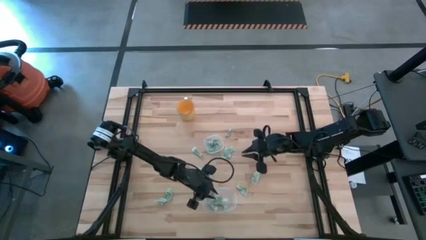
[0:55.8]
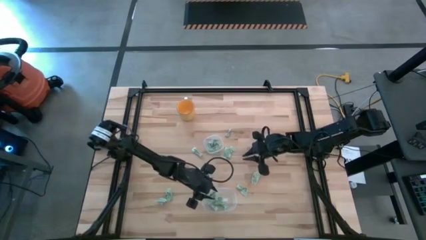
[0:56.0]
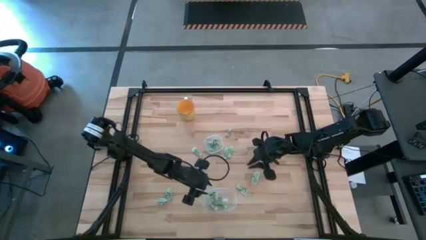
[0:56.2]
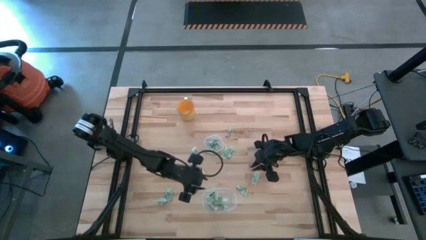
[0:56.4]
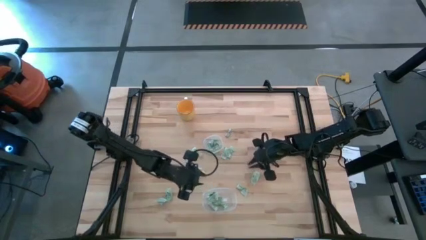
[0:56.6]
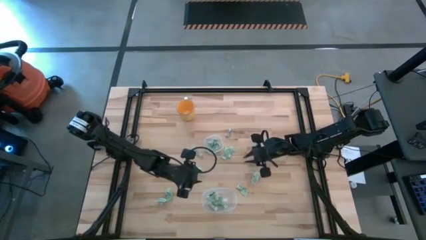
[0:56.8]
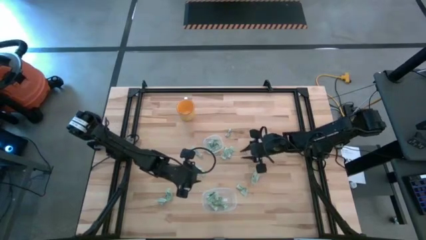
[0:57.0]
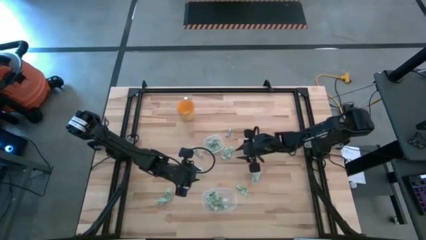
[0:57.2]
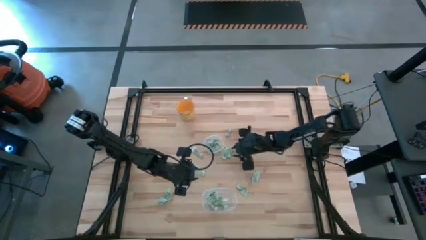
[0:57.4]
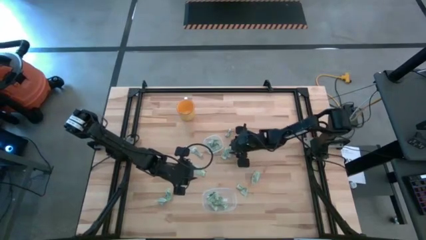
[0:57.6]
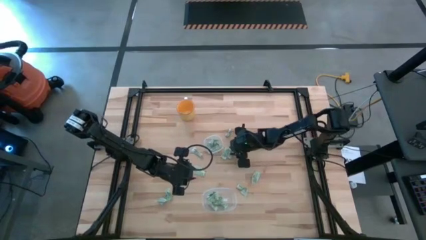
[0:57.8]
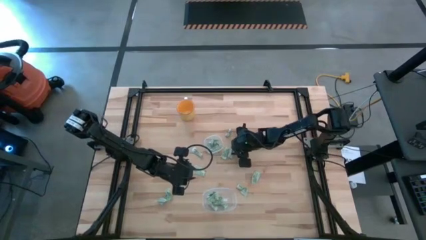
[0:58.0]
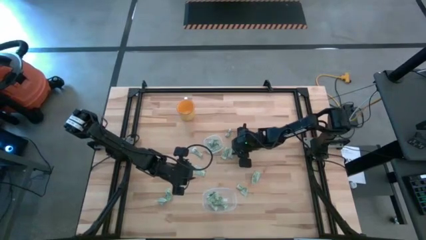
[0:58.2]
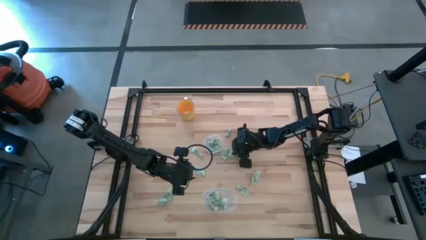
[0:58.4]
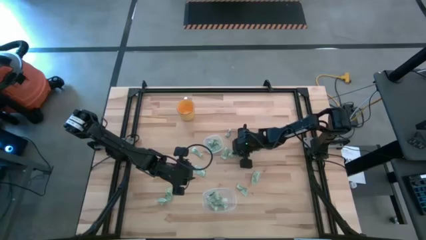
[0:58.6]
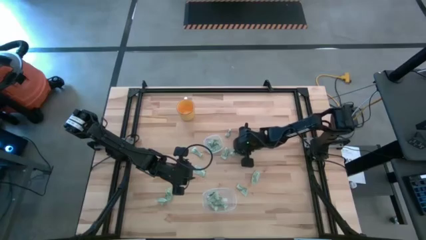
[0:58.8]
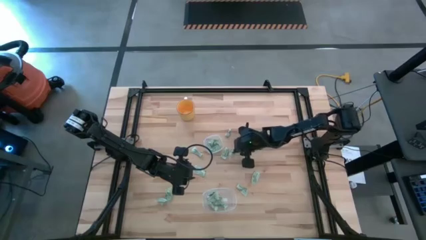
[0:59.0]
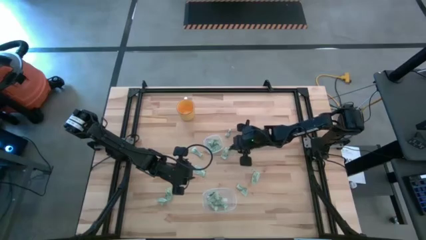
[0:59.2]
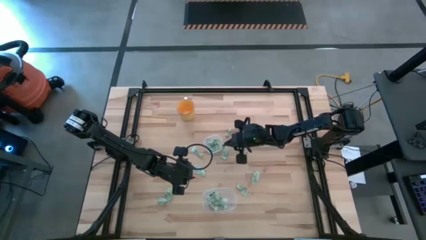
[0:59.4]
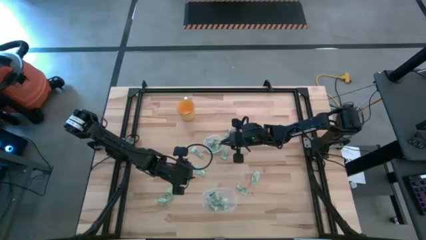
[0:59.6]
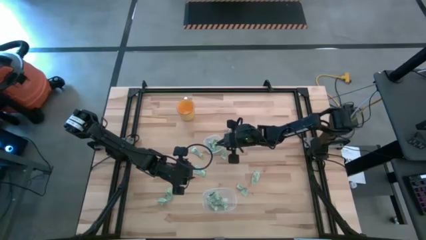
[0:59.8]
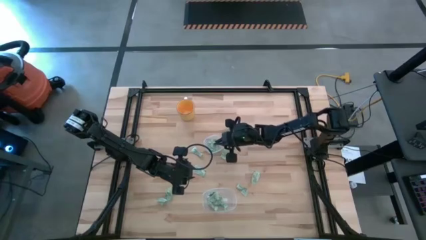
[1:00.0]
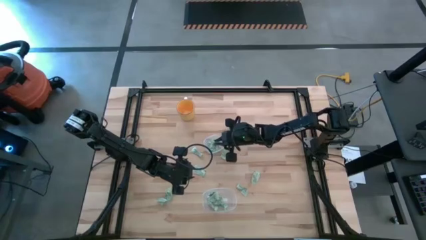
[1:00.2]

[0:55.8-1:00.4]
Put the white stevia packet into the top transparent bin

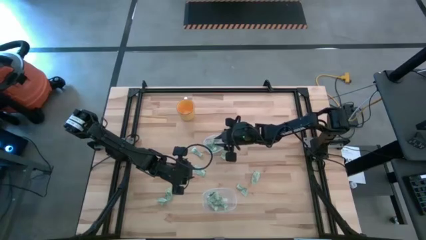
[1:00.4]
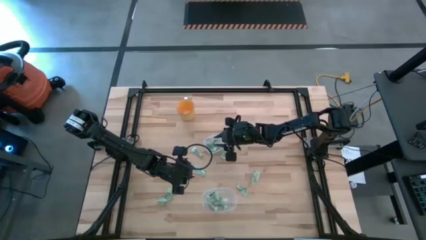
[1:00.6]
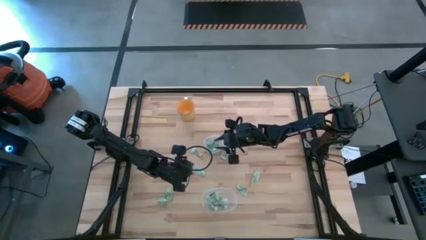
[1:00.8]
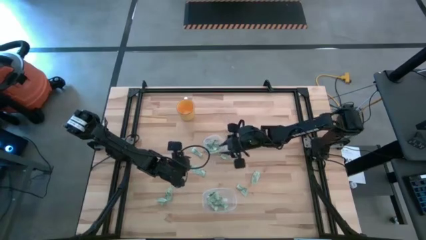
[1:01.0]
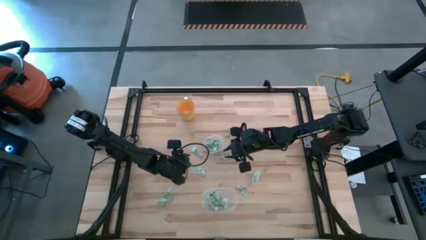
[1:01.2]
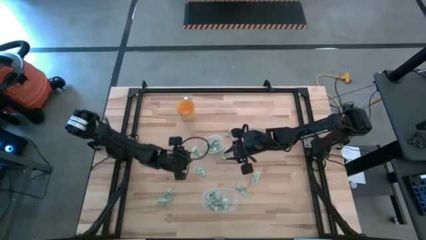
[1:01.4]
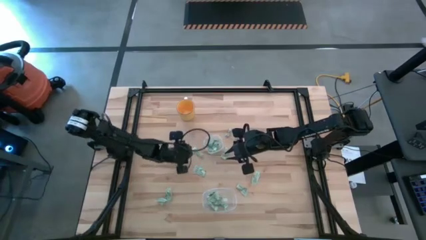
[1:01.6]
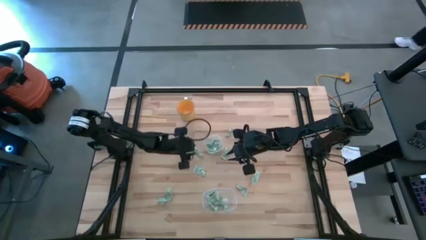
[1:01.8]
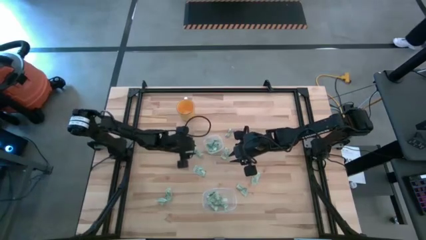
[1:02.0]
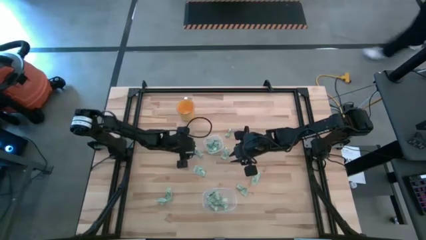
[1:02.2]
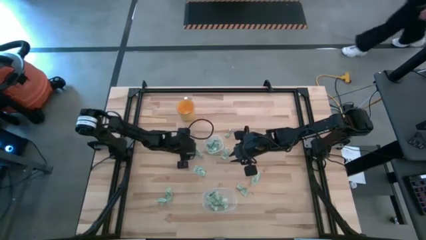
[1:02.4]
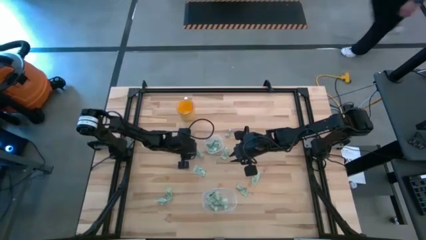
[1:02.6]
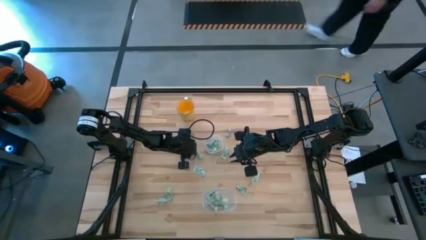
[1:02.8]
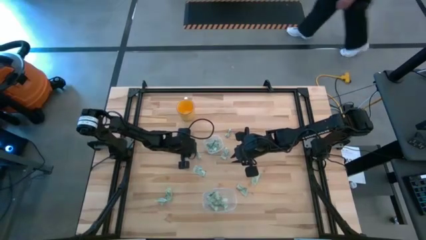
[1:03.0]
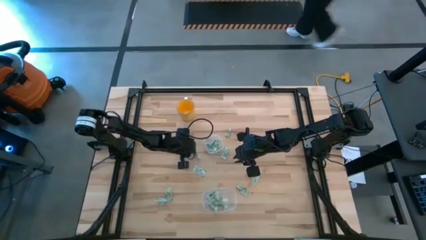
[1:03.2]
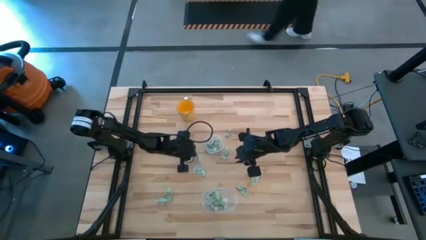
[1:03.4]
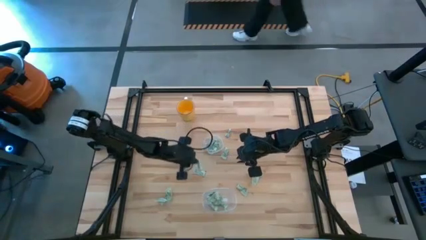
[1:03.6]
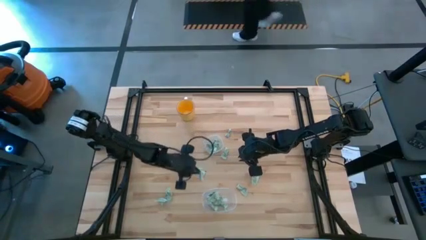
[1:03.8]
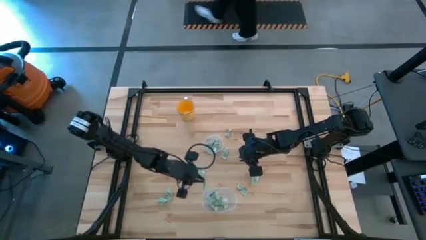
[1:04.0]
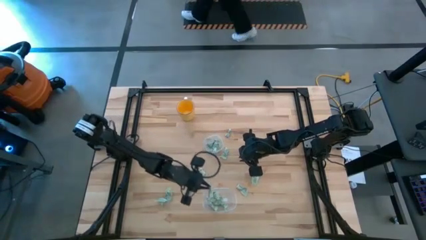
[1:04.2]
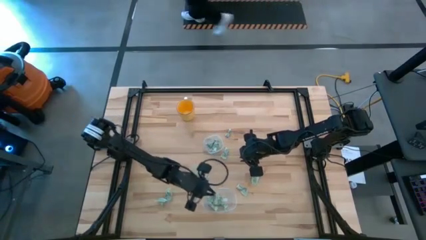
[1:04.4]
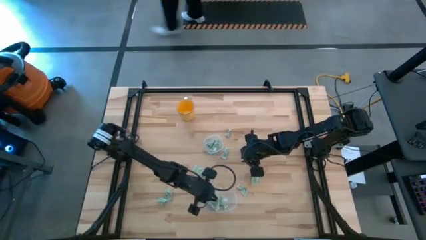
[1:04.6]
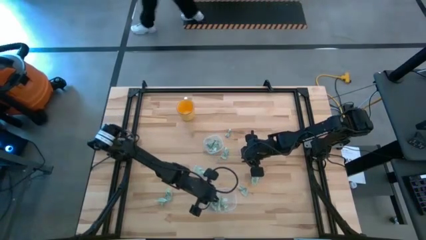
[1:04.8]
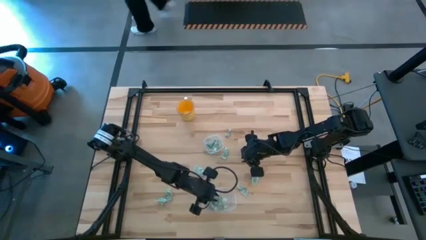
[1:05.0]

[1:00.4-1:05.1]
Put the white stevia packet into the bottom transparent bin

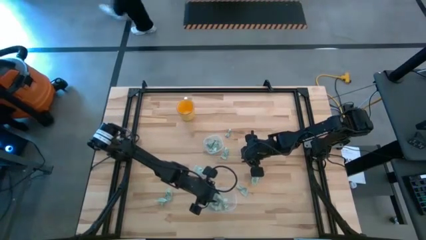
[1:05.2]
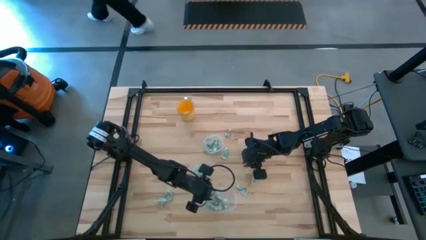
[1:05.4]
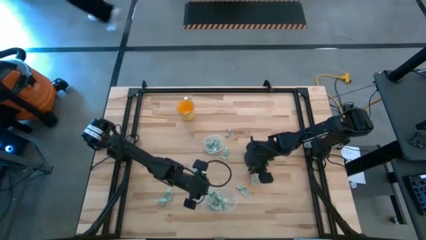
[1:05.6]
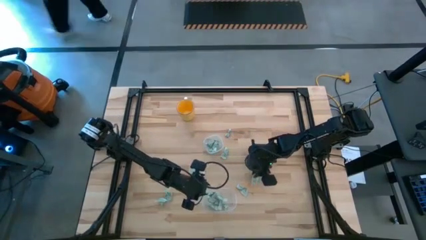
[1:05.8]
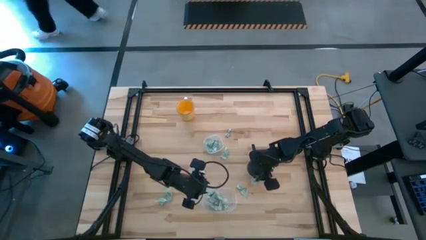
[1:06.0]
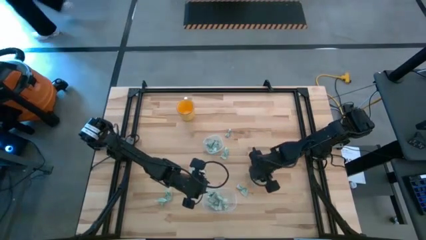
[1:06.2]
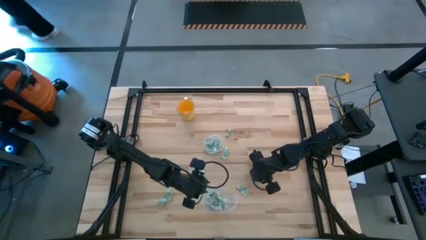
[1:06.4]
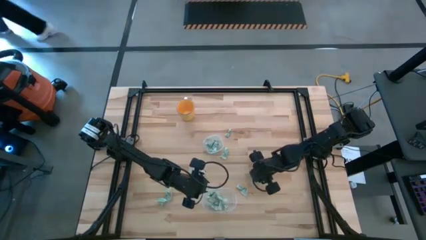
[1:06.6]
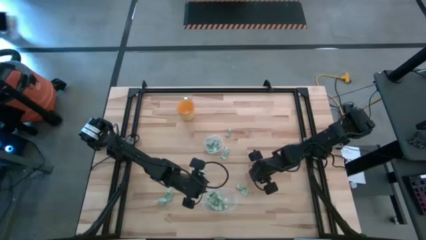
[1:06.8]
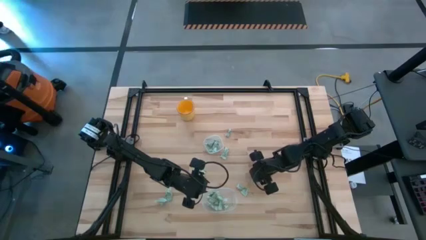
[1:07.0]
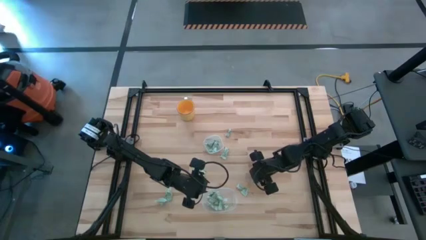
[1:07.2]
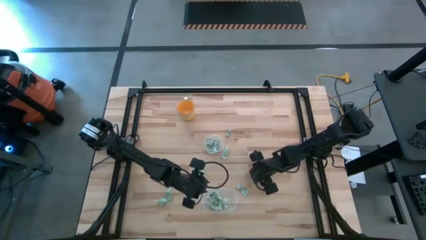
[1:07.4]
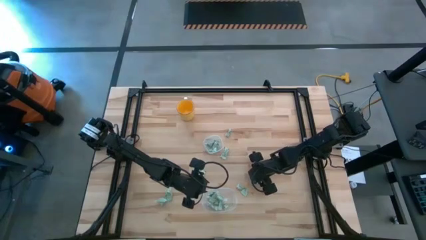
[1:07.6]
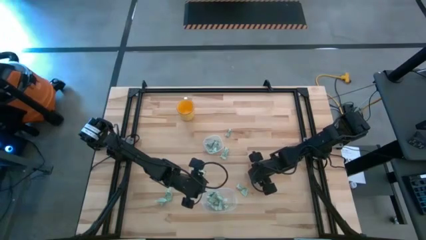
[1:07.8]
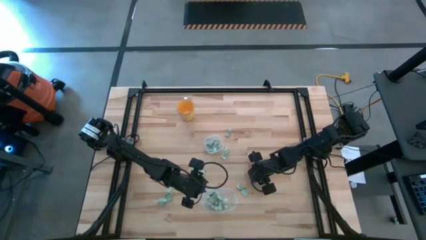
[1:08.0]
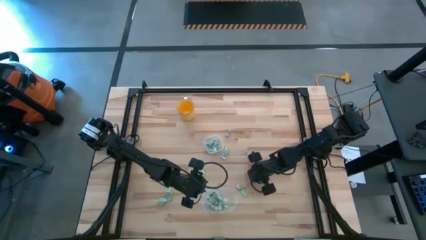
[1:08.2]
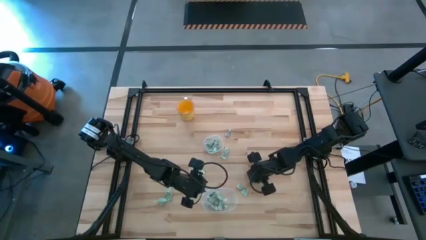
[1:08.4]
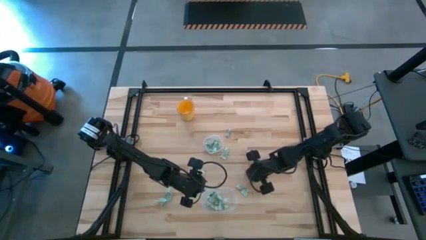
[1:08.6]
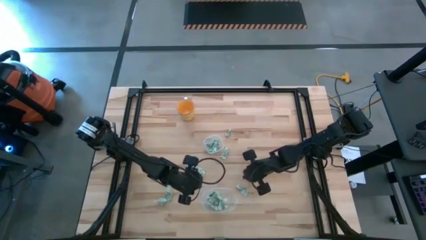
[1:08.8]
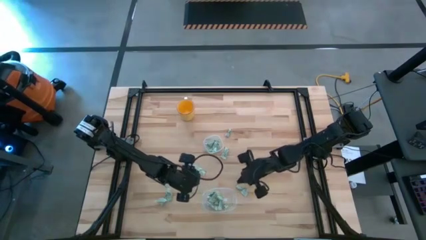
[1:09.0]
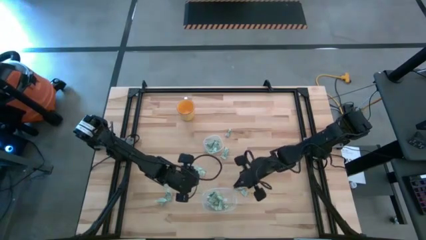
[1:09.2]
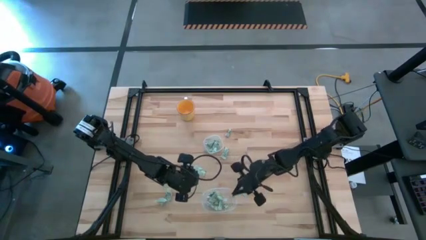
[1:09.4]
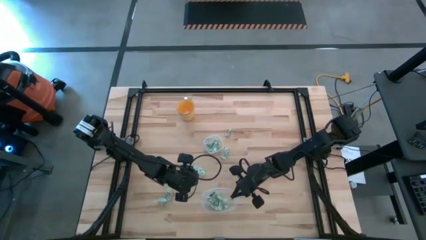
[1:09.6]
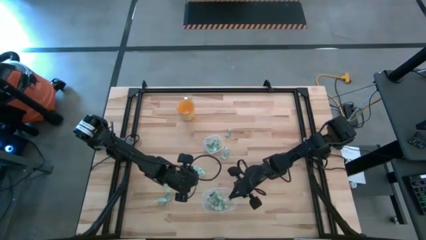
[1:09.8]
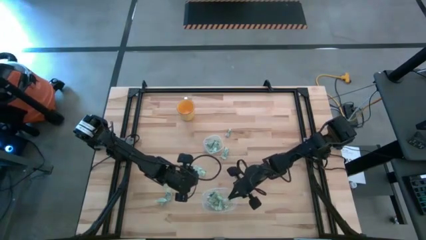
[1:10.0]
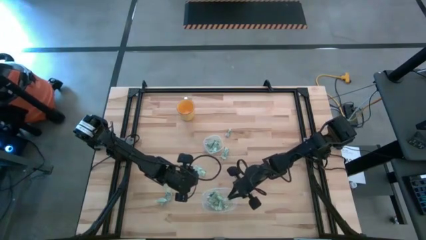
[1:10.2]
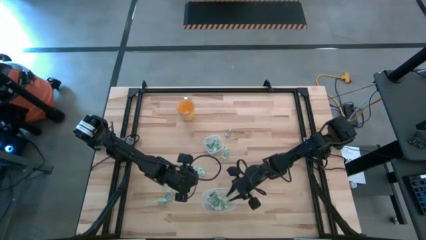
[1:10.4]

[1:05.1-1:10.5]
Put the white stevia packet into the top transparent bin

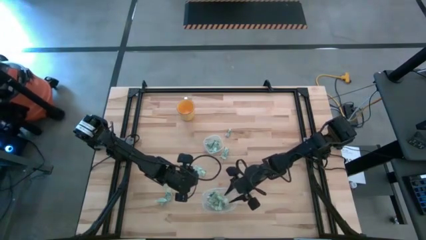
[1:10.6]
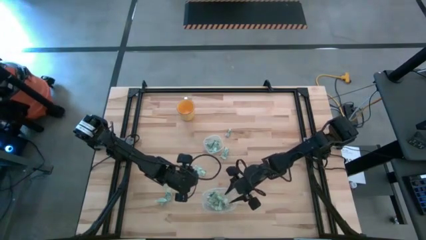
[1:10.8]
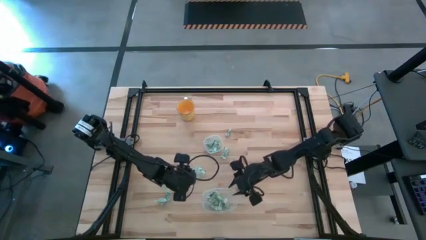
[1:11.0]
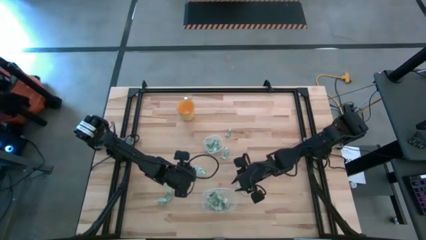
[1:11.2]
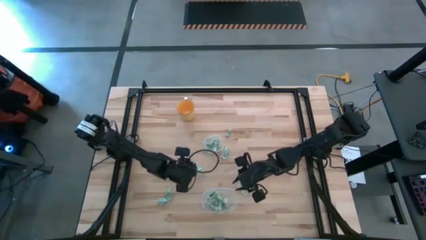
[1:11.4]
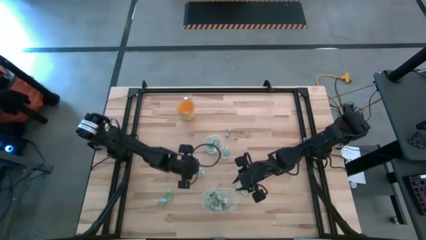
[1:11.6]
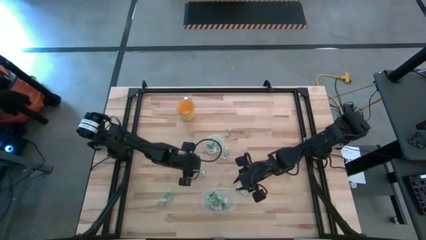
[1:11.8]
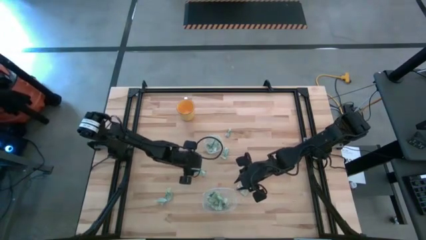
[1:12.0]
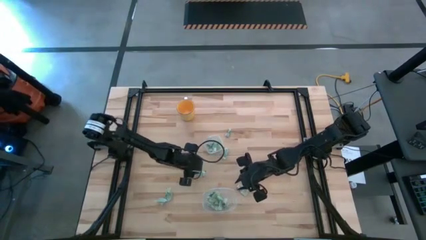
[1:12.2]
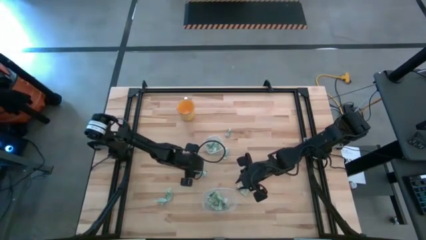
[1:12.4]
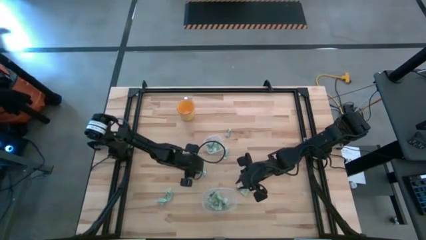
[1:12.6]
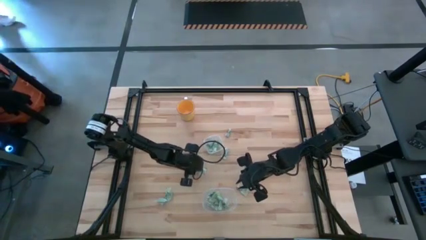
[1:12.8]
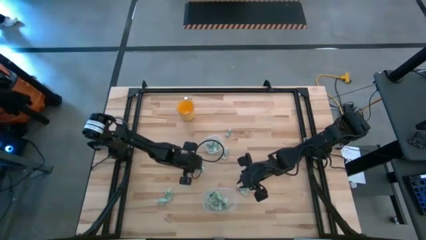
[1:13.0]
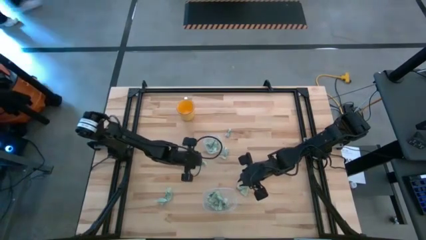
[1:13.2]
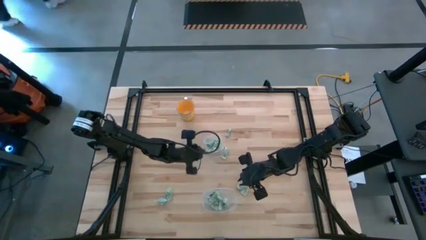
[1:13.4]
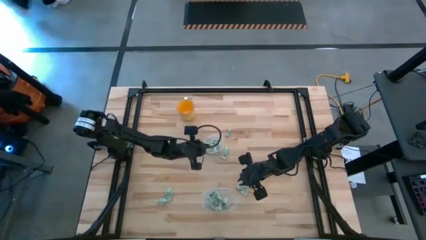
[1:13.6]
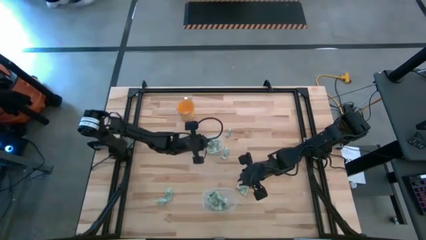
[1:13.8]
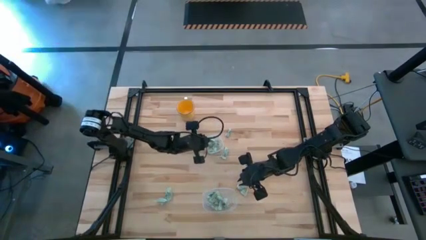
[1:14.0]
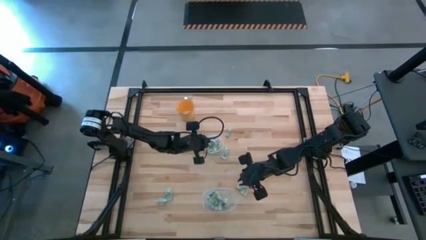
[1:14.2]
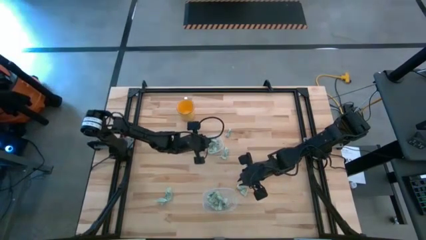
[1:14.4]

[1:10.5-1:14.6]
Put the white stevia packet into the bottom transparent bin
